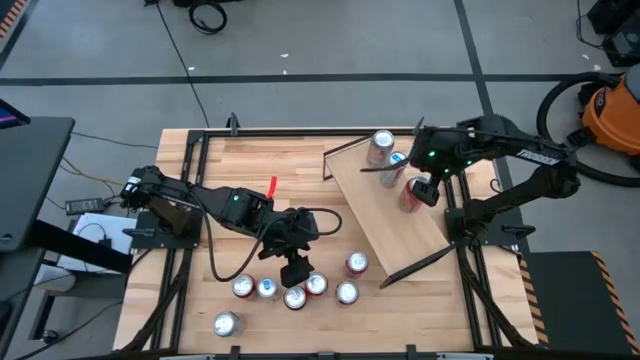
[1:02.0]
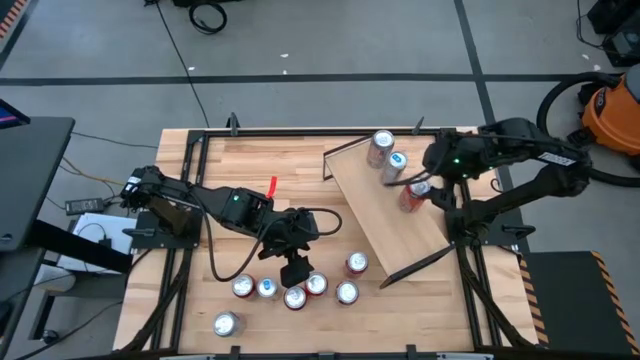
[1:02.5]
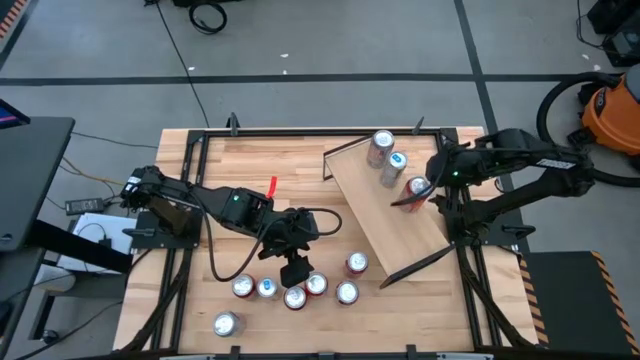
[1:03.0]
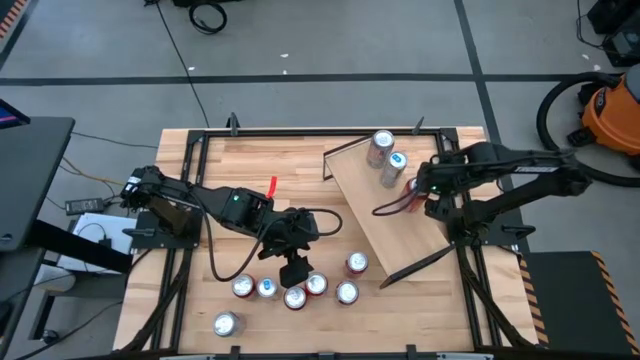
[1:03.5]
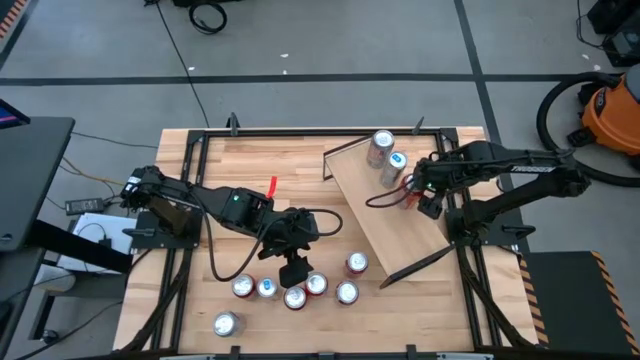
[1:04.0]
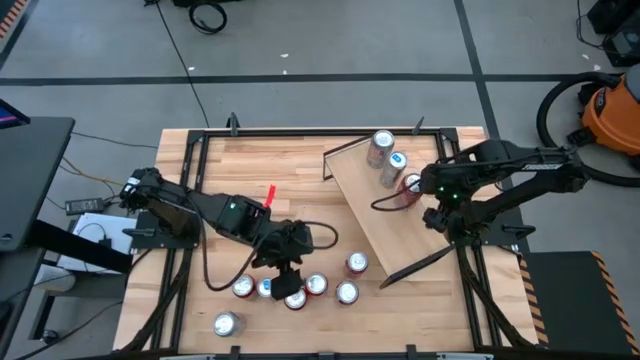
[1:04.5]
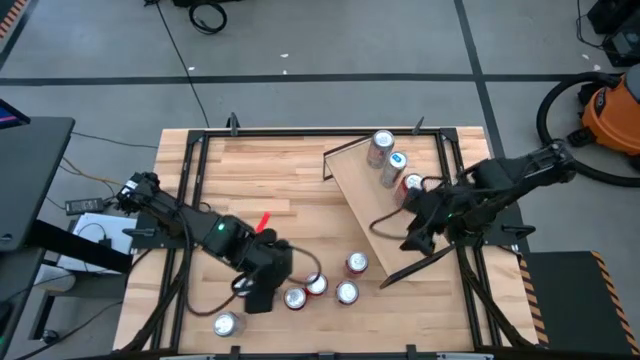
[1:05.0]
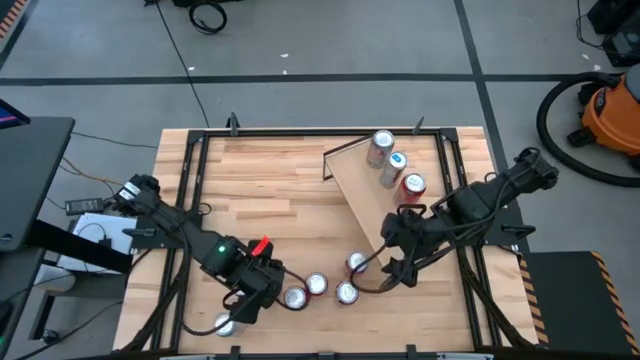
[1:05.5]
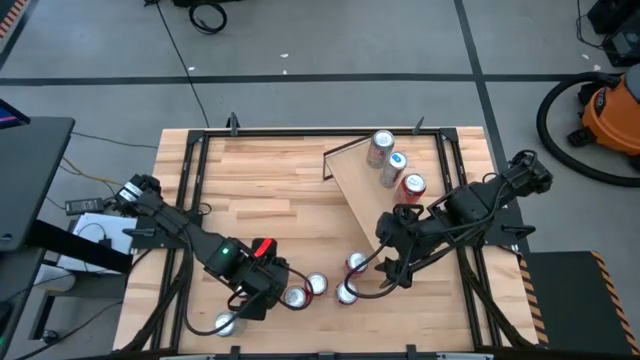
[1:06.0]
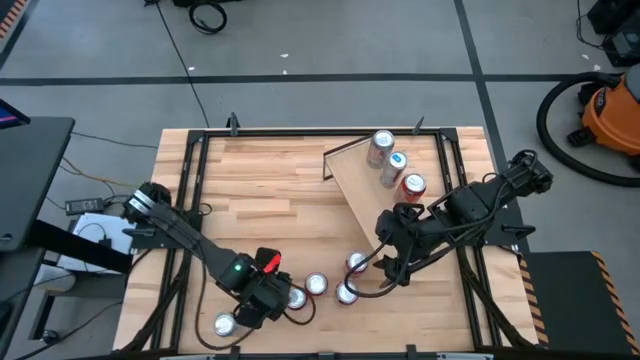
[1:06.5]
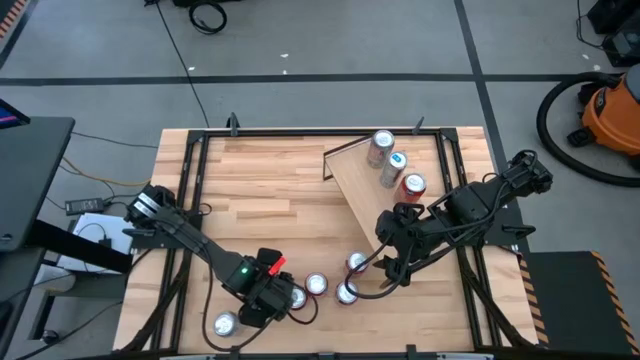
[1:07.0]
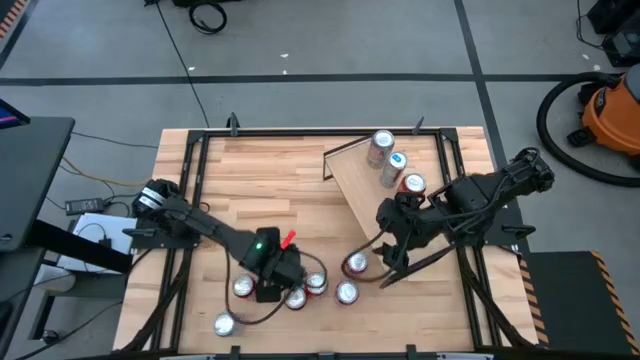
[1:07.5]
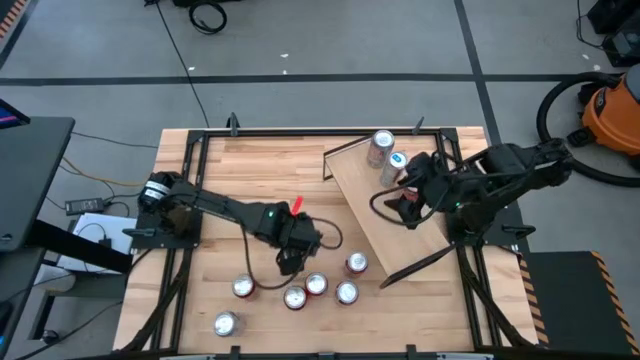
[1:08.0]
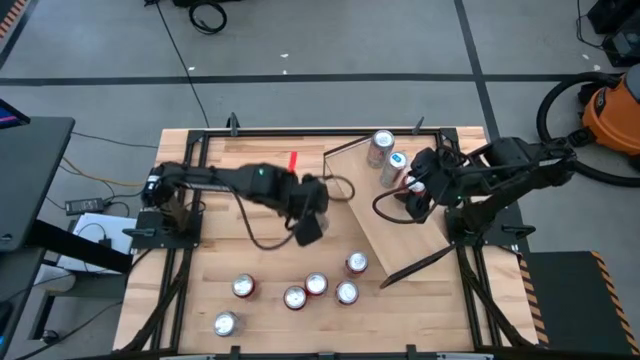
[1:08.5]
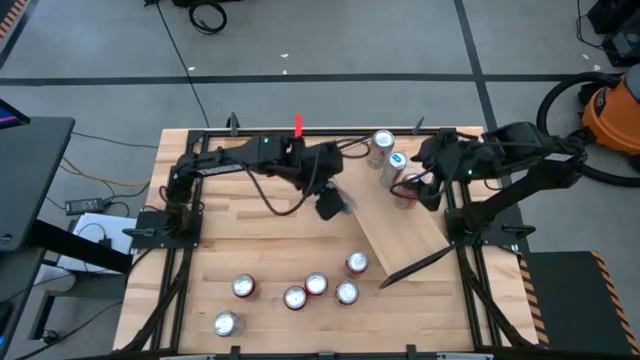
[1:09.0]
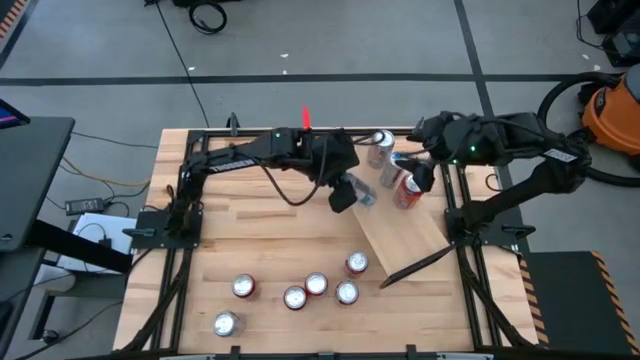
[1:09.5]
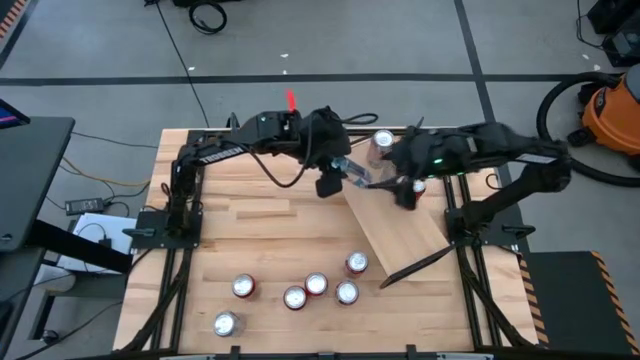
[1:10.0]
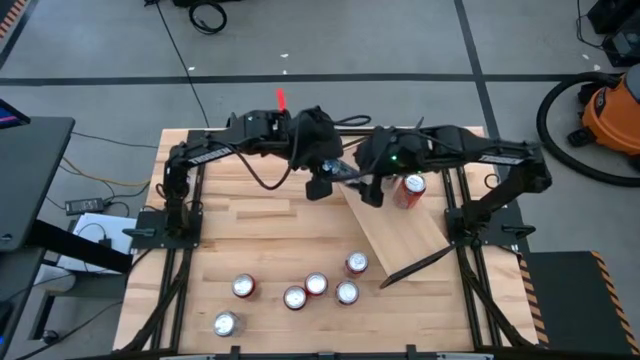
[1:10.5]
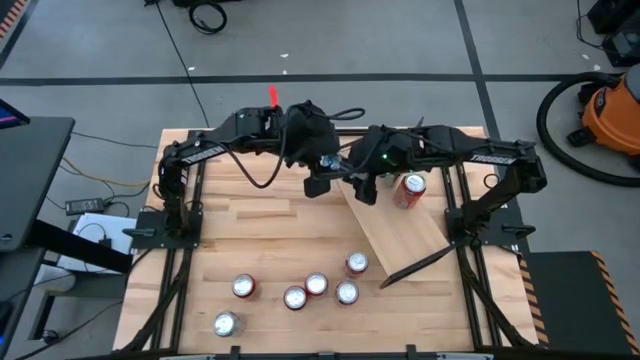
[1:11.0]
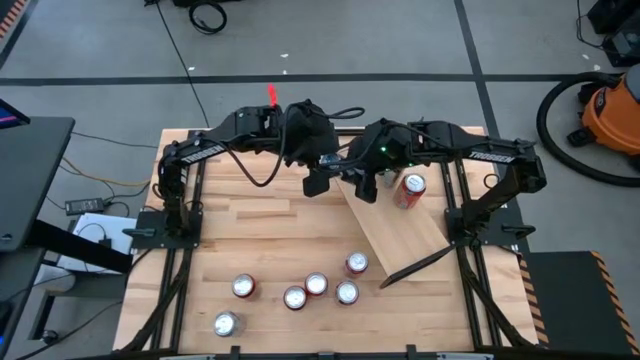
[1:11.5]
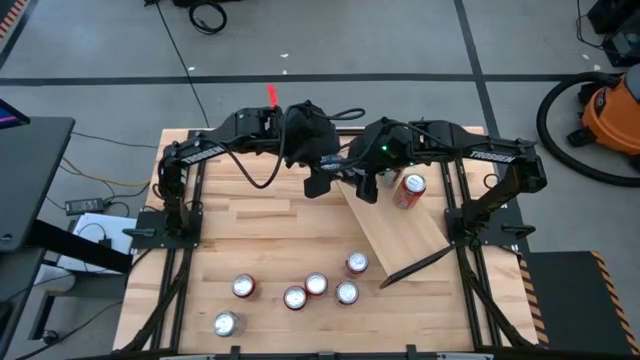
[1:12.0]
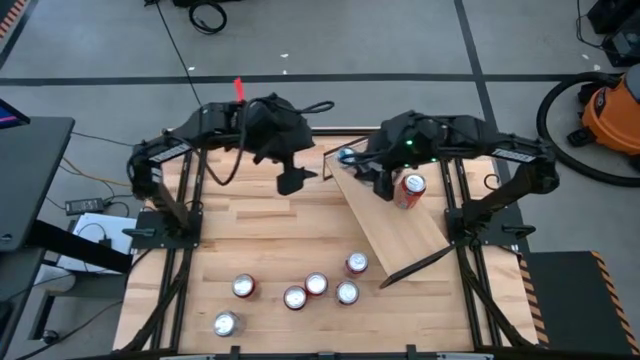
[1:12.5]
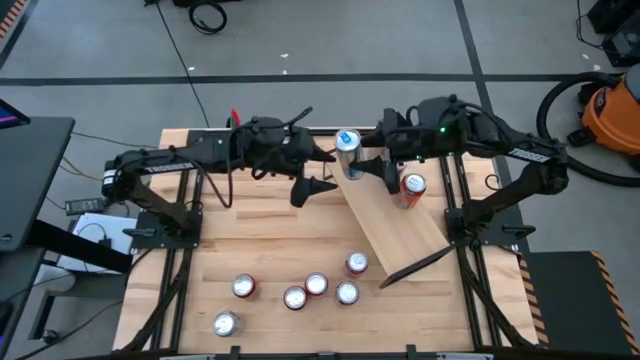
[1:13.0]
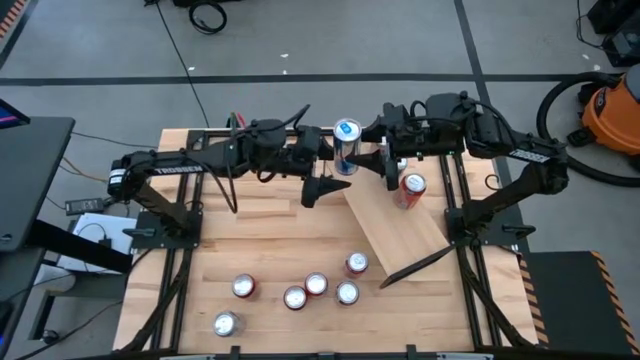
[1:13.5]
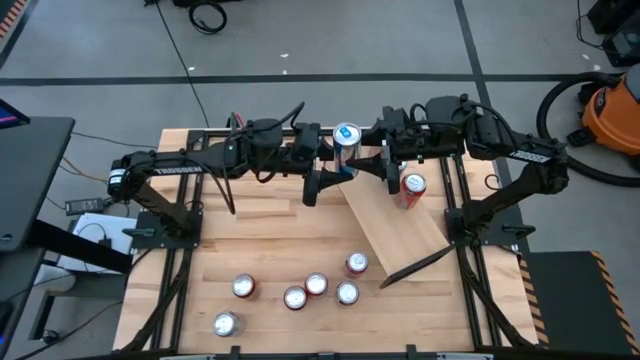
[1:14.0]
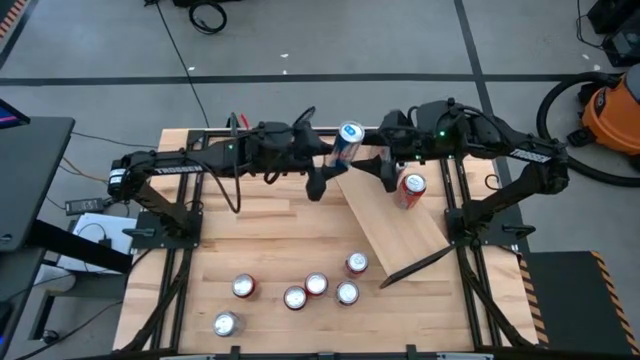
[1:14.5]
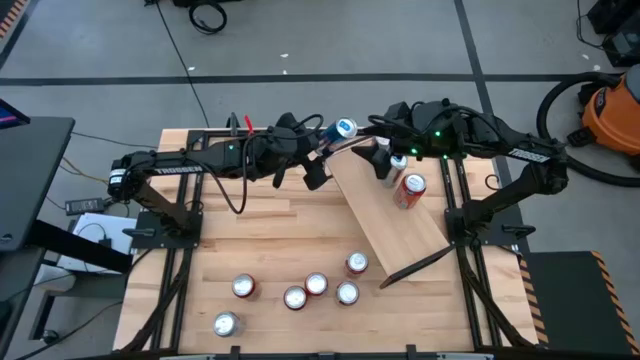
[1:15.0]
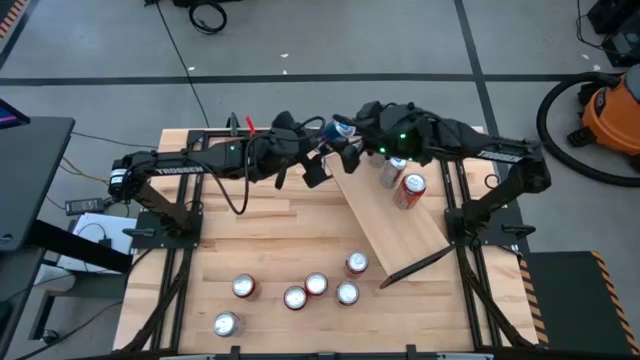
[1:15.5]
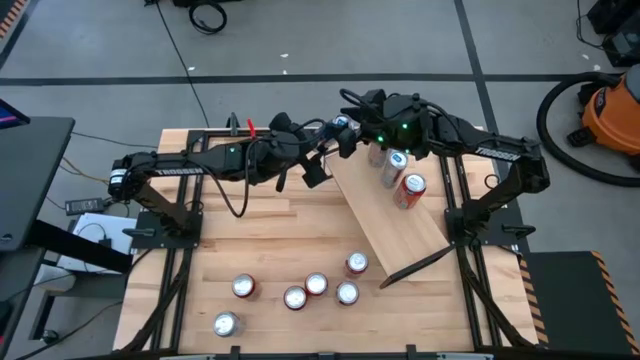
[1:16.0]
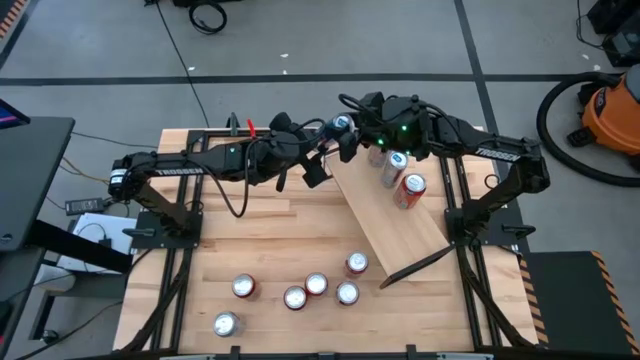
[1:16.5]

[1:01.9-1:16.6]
Task: Place canned beverage on shelf
Put the blue soda can on the shelf aligned with the other blue soda can

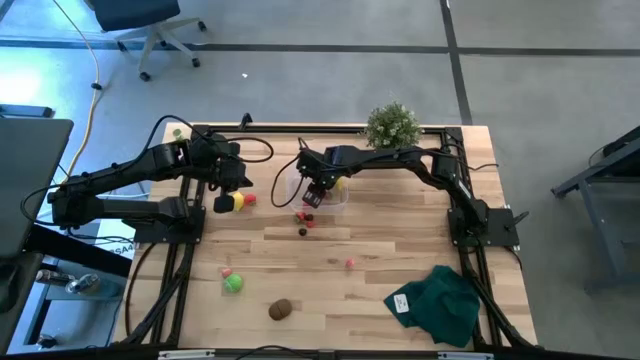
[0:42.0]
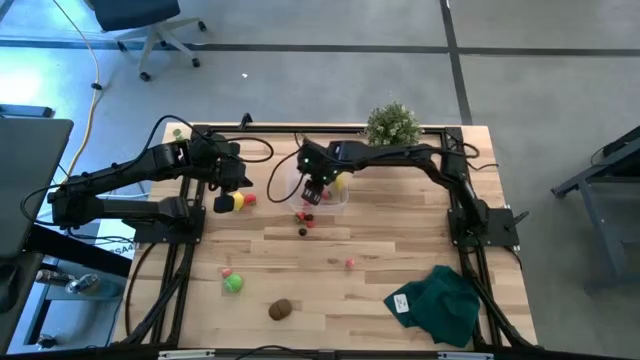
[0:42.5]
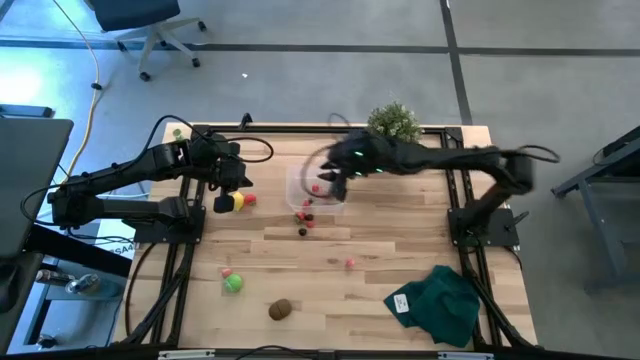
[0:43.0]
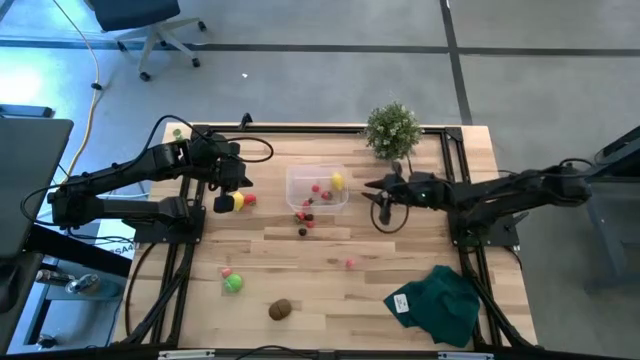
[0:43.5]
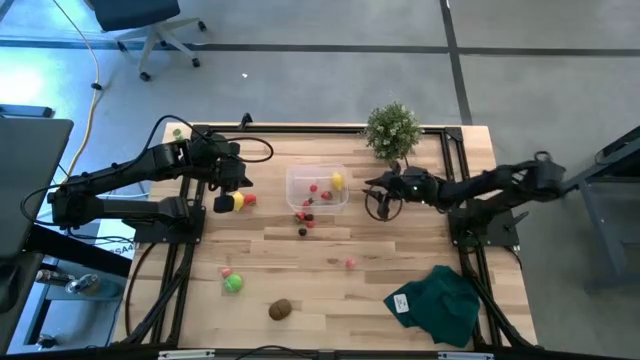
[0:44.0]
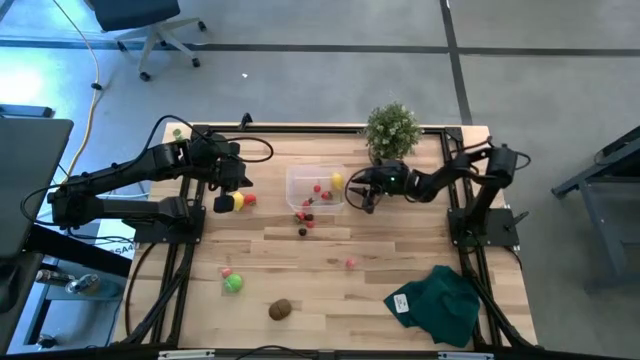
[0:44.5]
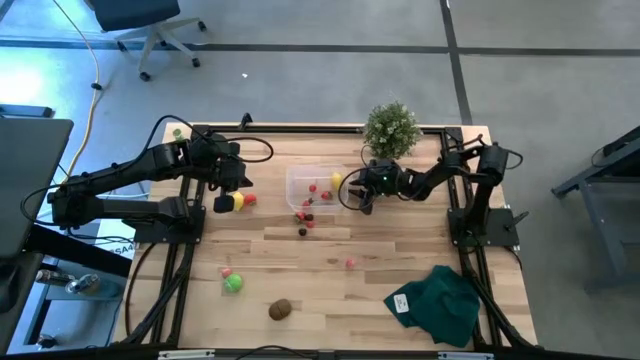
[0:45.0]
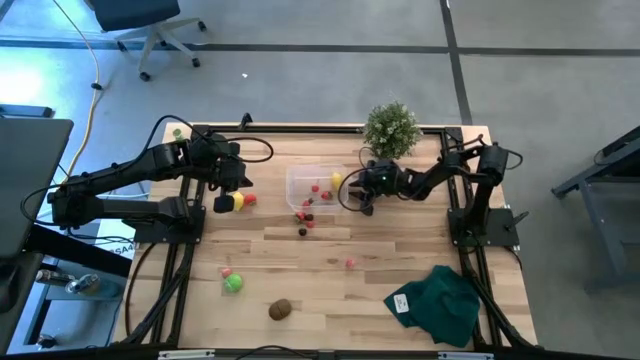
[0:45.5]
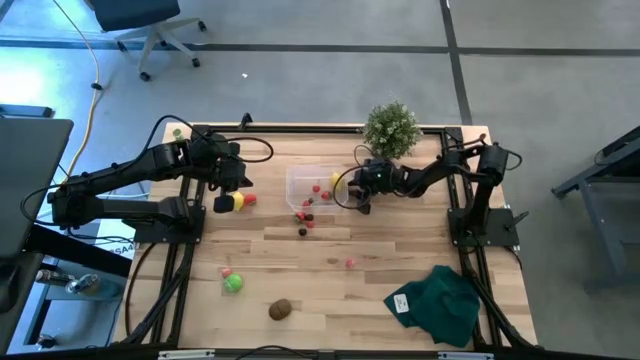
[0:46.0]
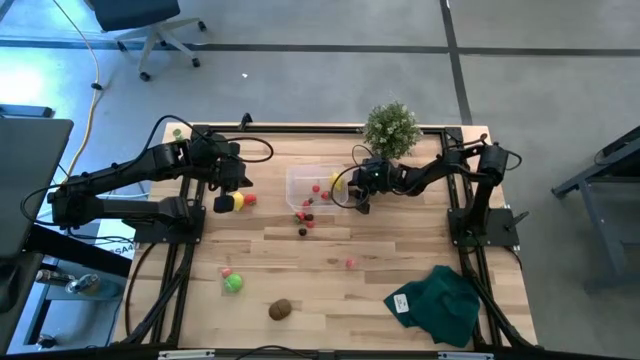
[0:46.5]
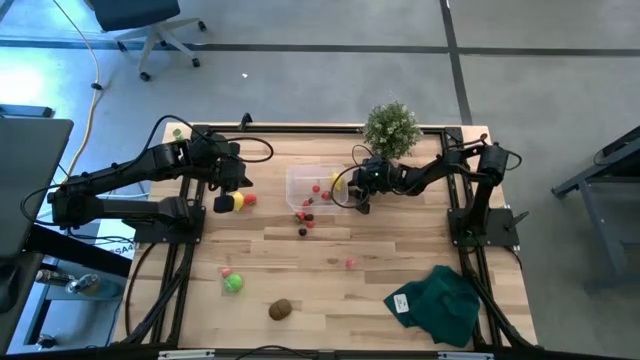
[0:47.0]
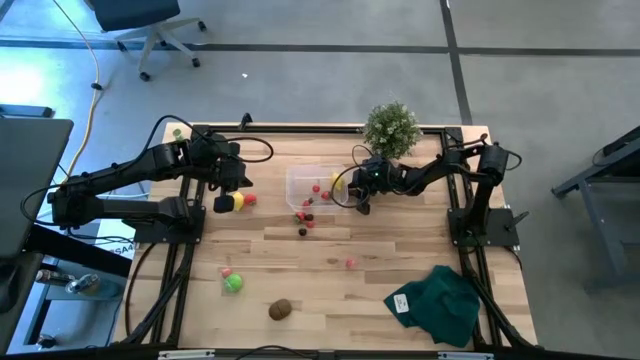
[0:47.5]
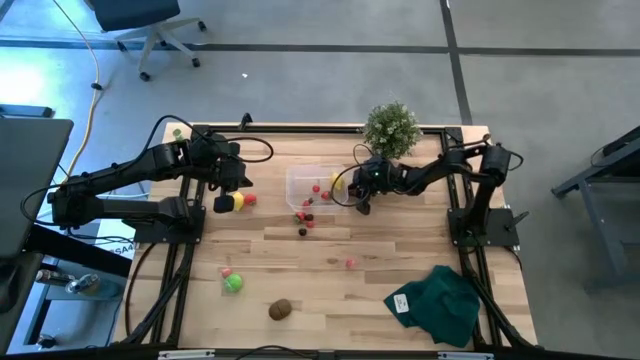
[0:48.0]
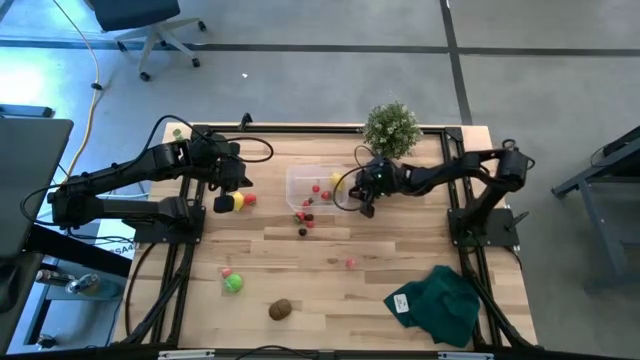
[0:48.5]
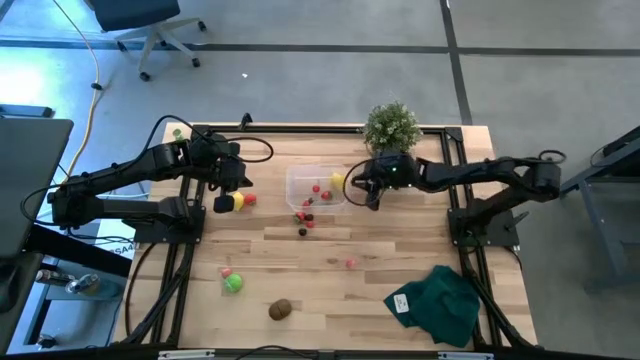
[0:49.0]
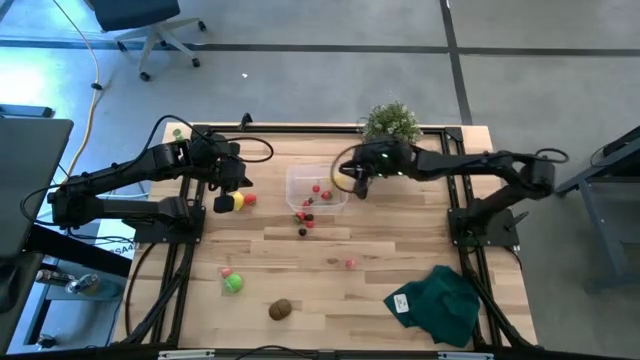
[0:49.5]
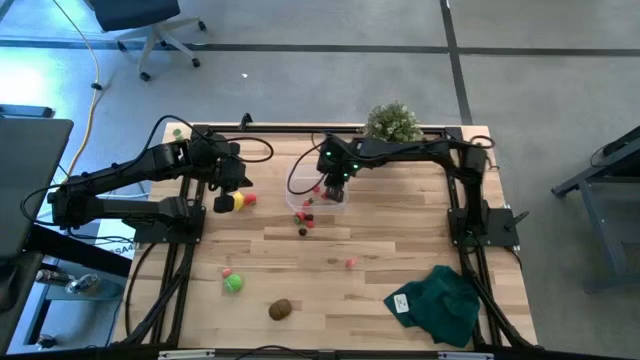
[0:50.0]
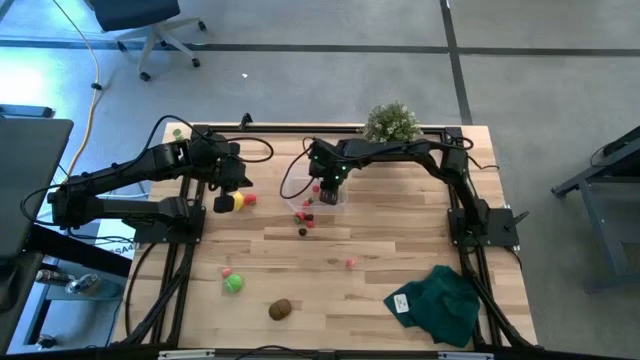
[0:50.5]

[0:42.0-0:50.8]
Task: Pick and placing Produce into tupperware
Put the blueberry into the transparent bin
